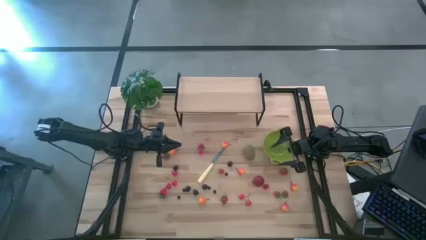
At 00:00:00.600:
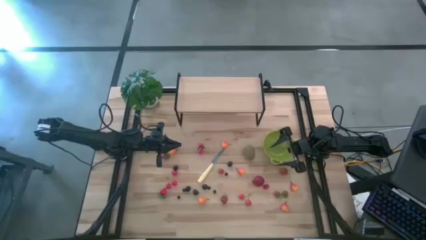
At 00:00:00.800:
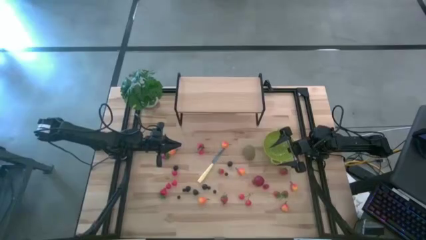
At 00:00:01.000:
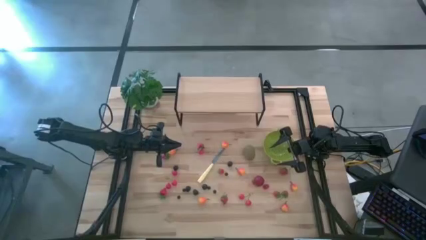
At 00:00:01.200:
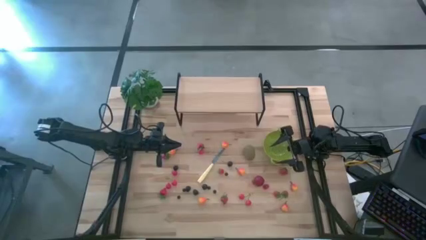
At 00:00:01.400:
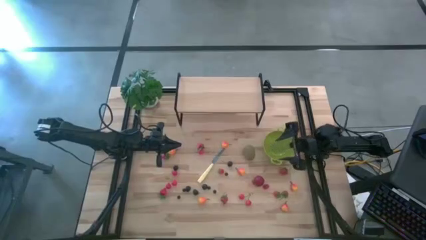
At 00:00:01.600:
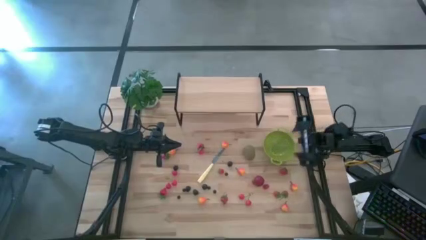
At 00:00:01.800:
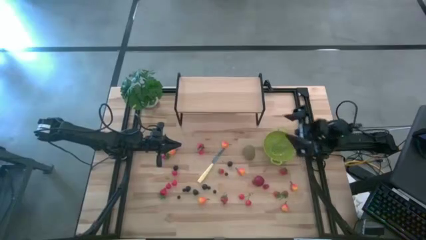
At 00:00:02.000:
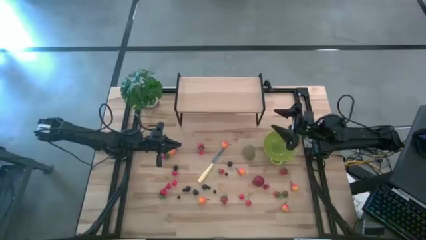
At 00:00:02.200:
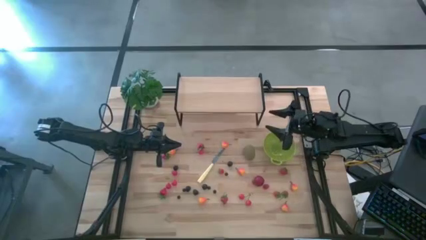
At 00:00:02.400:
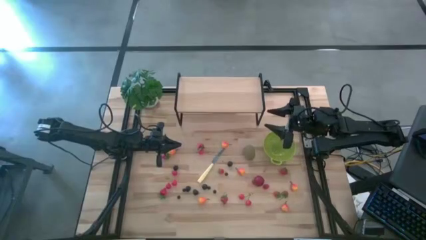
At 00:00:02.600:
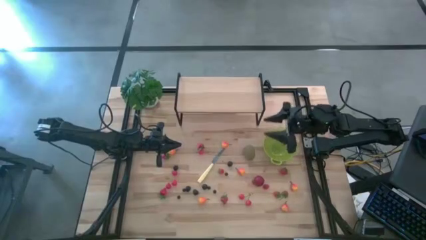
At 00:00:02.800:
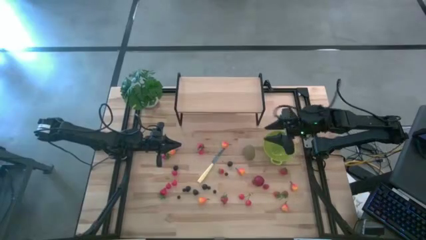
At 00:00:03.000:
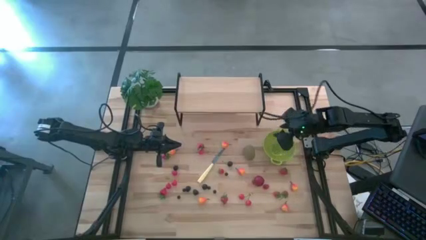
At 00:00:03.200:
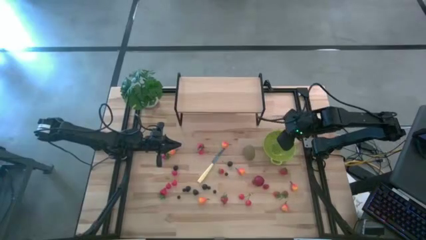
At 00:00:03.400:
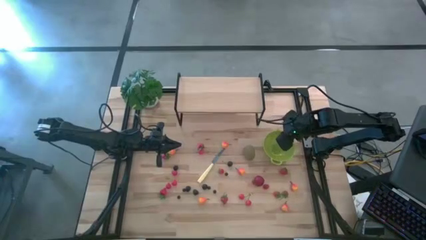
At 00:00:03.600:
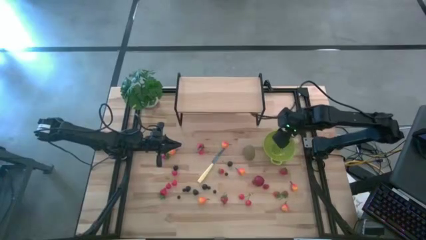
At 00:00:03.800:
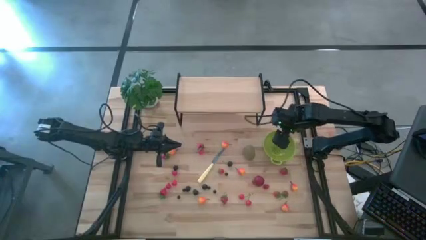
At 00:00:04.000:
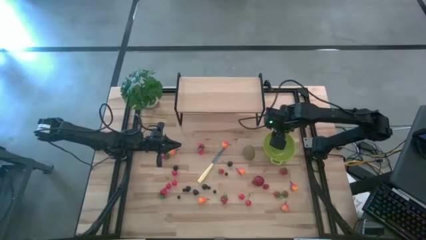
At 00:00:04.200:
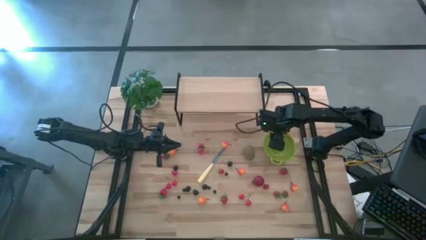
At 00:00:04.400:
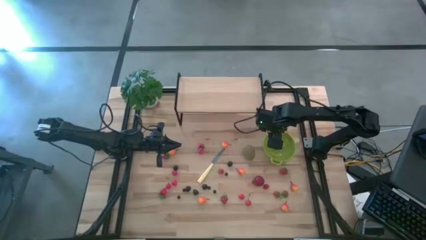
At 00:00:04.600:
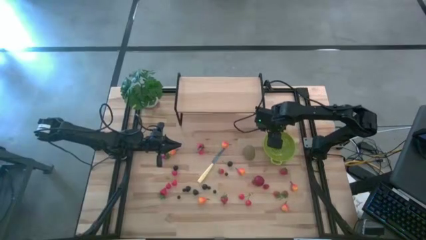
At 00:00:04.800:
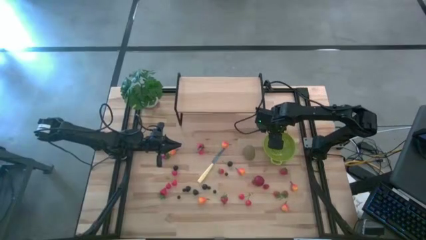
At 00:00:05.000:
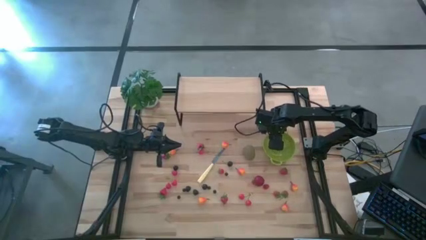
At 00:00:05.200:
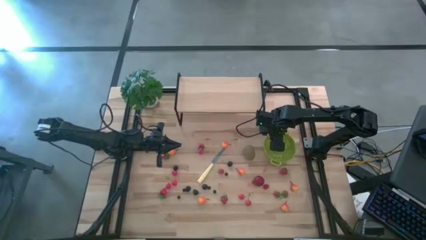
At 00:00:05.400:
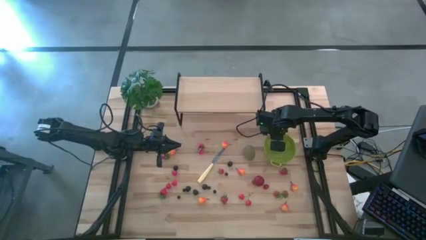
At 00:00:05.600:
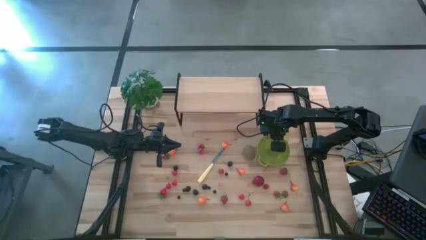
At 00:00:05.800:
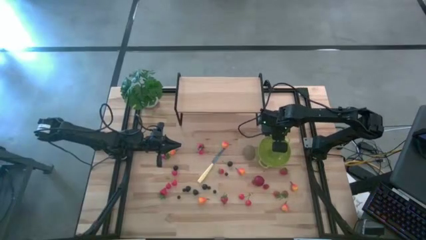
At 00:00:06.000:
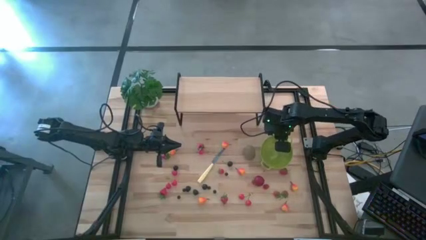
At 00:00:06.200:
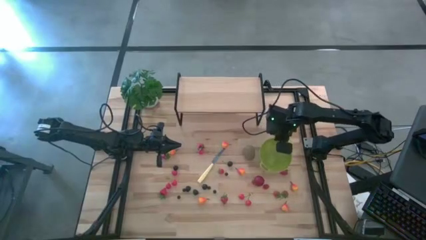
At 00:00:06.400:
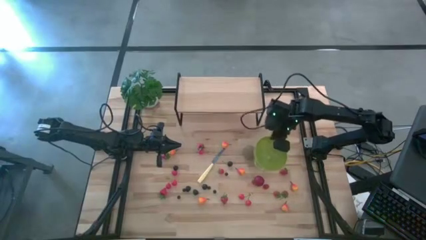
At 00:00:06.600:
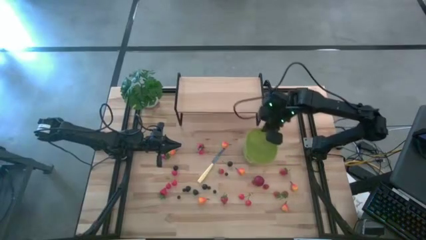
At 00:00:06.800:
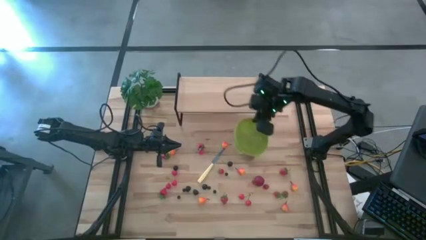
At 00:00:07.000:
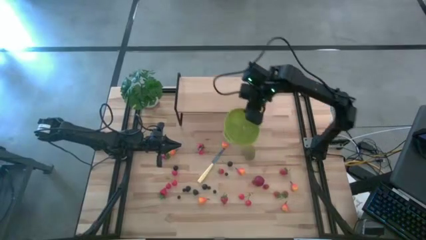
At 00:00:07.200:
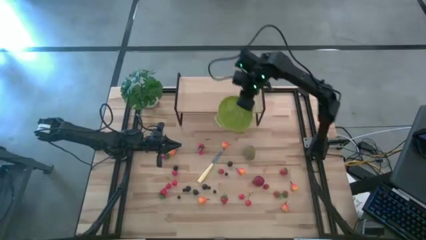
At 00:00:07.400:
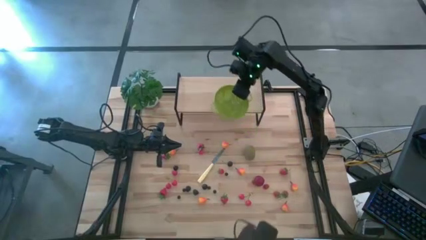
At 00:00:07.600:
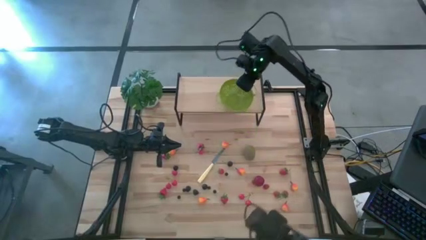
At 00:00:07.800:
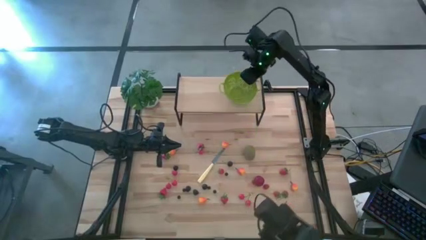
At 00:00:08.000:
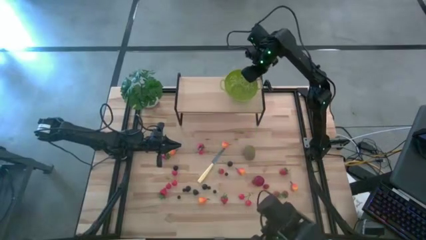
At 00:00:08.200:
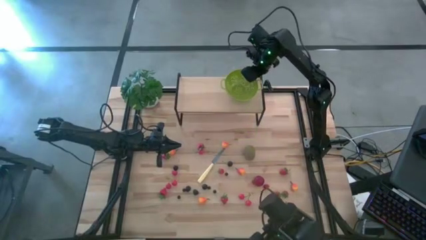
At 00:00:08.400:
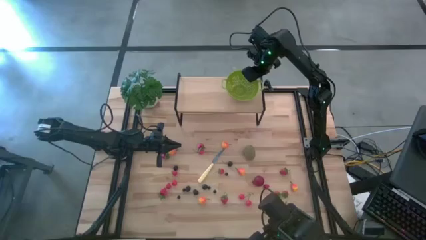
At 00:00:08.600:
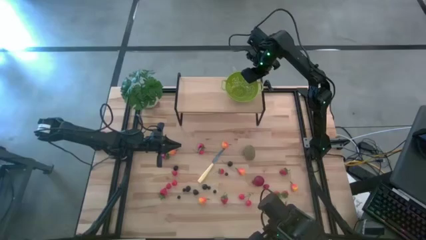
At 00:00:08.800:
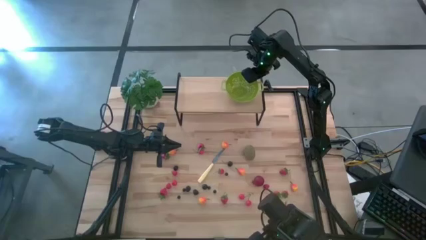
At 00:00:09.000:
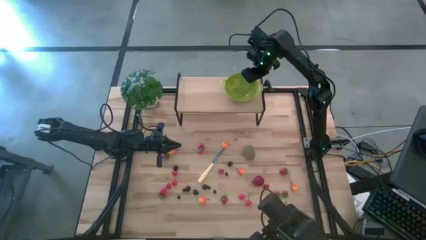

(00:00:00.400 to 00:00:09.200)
Task: Pick & Place Fruit
Put the strainer bowl on the shelf

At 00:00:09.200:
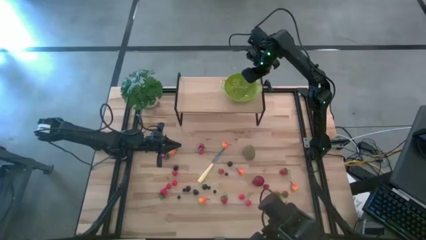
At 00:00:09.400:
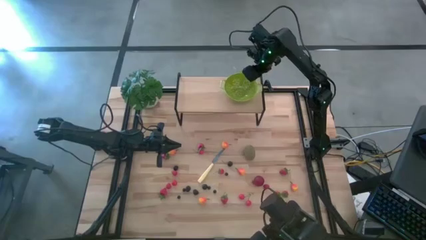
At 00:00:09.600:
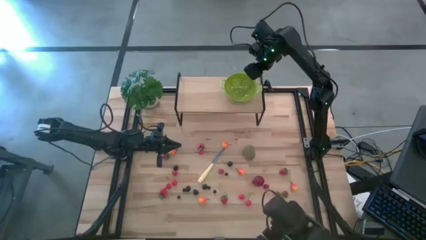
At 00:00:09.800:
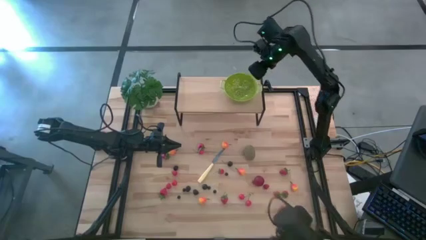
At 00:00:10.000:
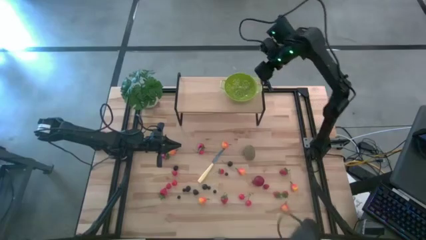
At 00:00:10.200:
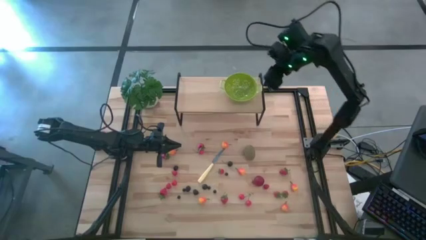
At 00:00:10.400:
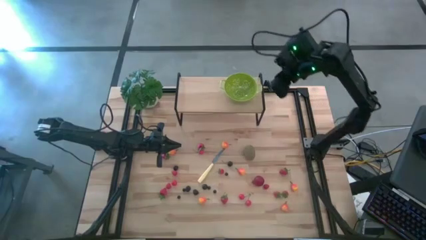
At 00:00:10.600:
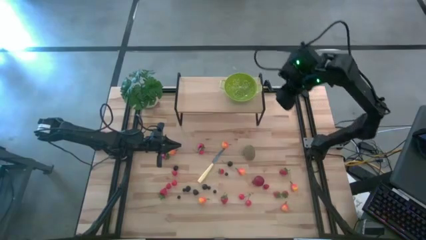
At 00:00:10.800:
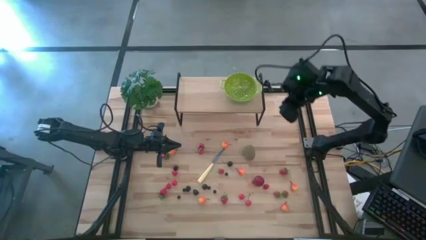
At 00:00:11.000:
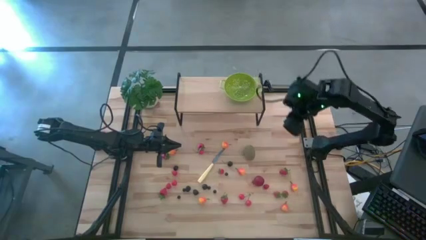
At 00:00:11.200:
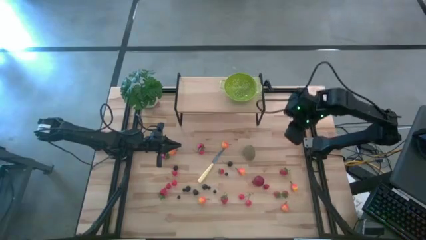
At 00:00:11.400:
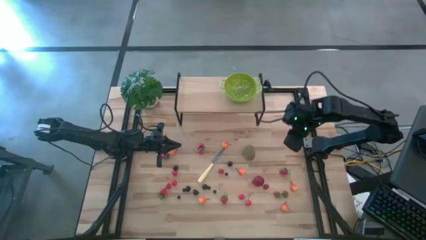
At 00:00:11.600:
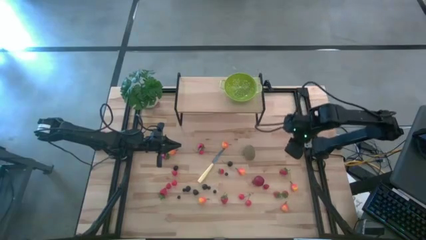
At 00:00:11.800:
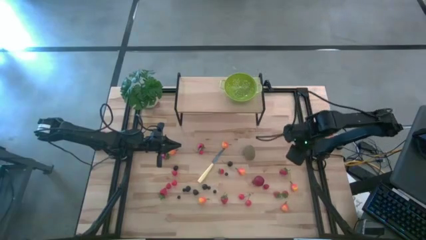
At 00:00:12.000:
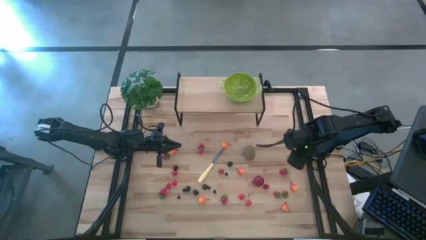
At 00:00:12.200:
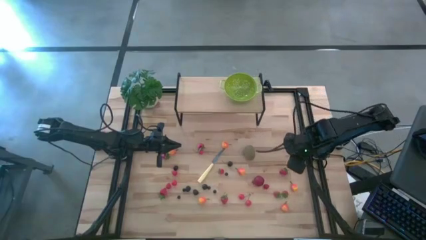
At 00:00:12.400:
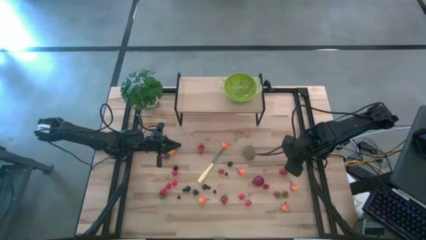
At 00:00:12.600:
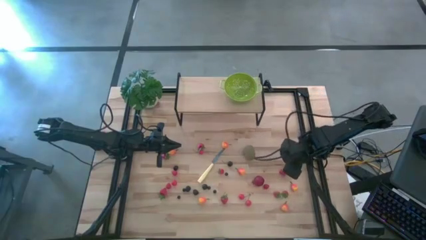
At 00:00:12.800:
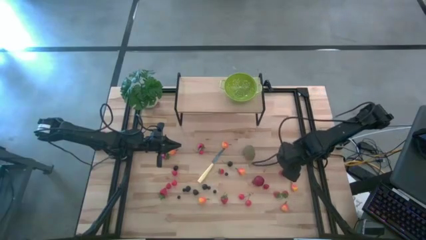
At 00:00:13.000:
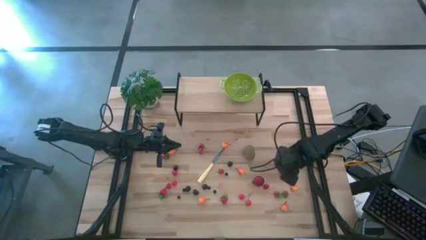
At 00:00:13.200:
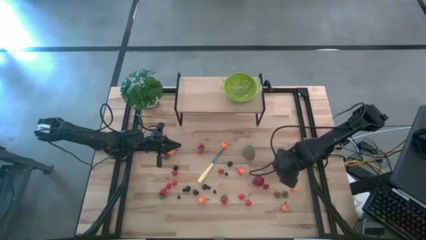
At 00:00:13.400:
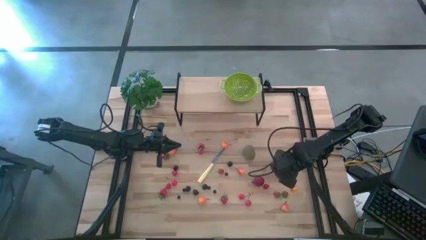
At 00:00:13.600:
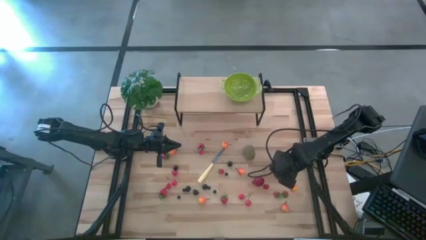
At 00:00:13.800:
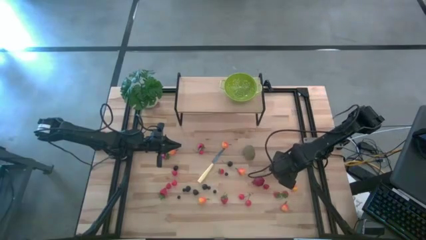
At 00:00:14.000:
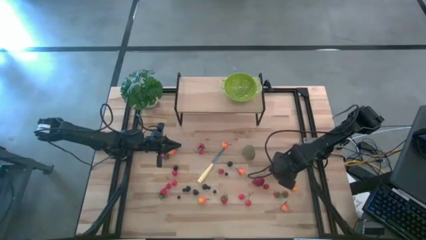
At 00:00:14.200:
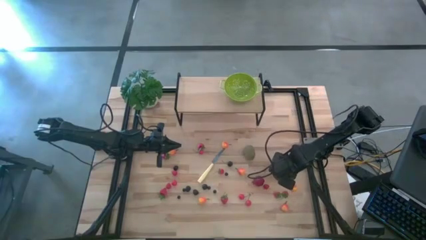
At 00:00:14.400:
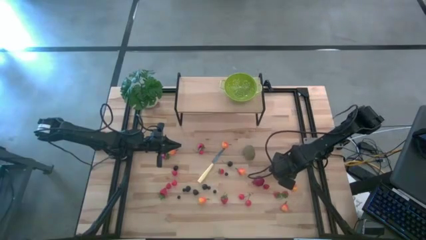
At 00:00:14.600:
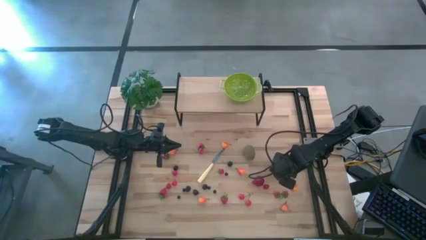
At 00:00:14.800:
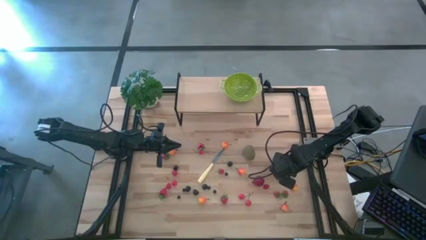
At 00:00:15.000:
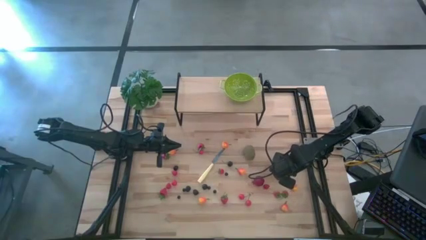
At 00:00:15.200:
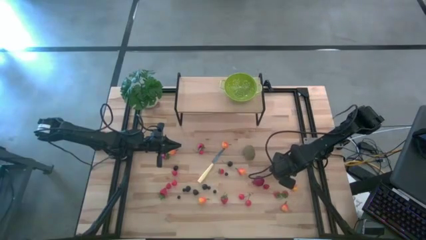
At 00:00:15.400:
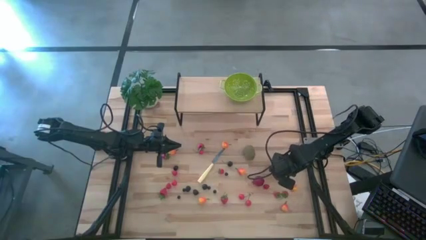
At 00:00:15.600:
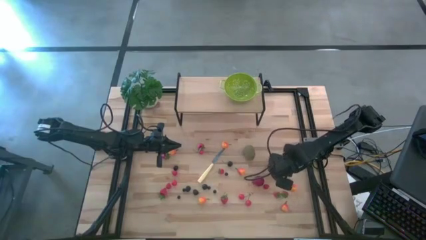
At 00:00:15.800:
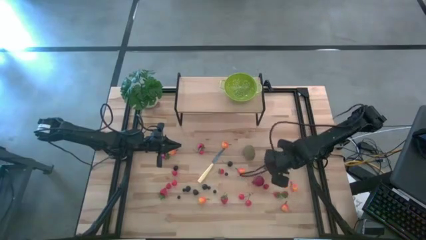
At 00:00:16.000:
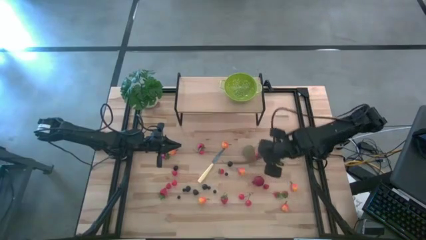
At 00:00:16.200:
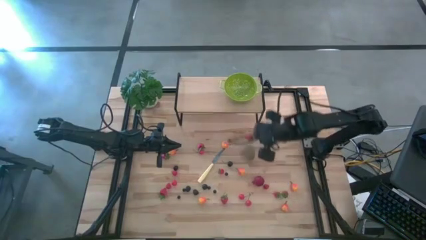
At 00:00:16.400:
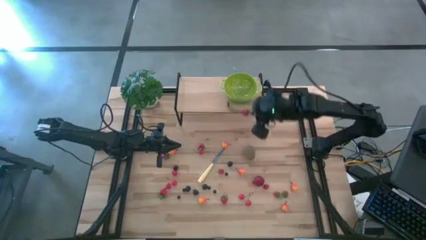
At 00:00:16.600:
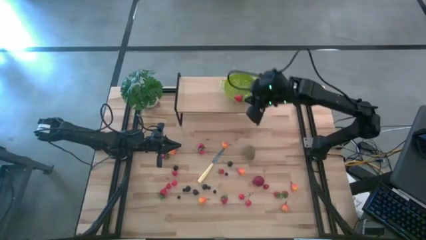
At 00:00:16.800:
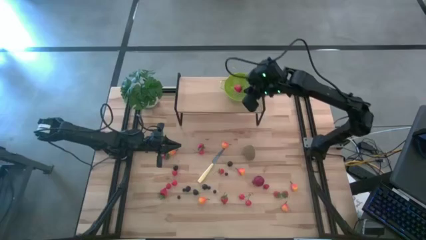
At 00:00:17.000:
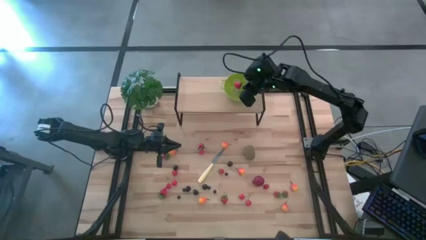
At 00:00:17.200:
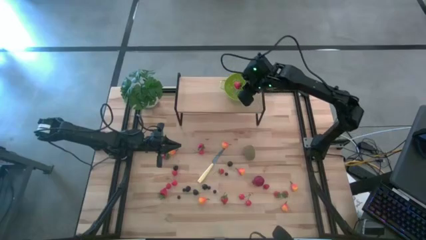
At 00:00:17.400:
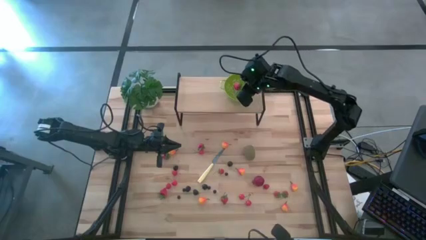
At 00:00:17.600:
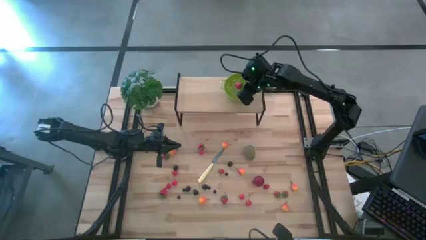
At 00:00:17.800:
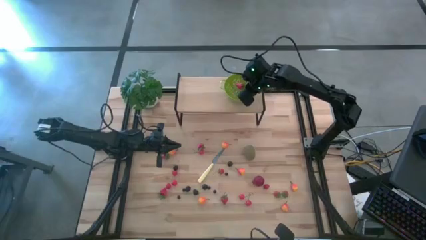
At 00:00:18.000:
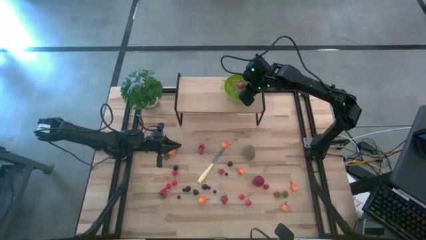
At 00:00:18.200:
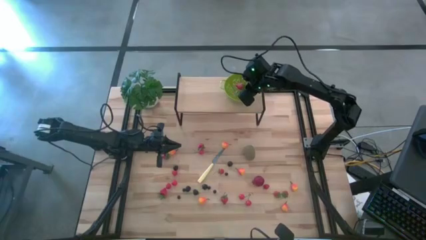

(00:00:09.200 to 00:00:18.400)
Put the strawberry into the strainer bowl
